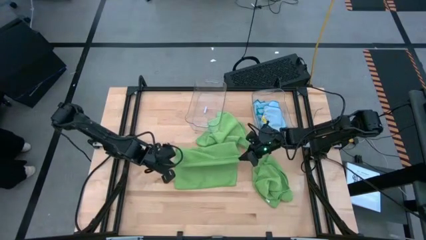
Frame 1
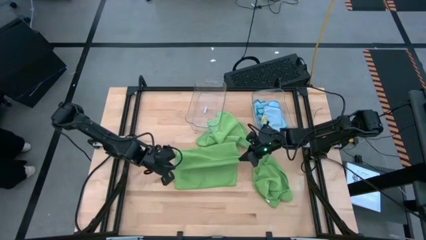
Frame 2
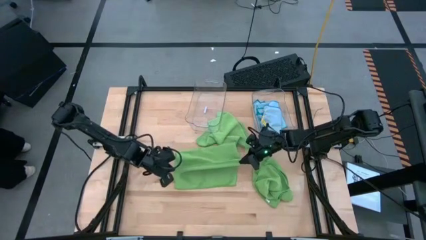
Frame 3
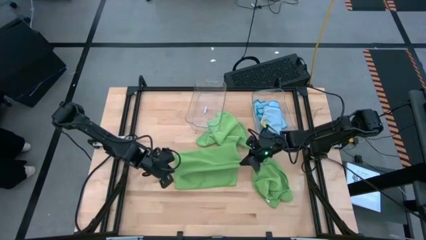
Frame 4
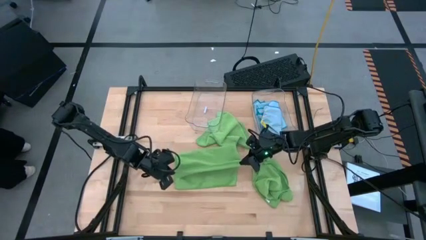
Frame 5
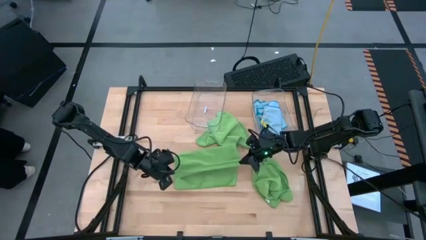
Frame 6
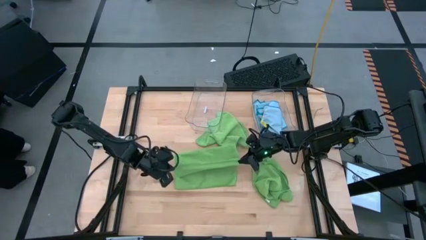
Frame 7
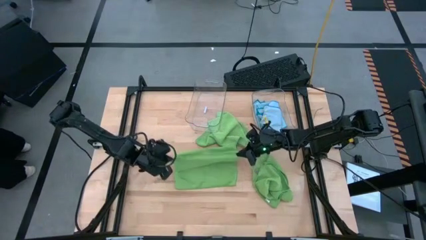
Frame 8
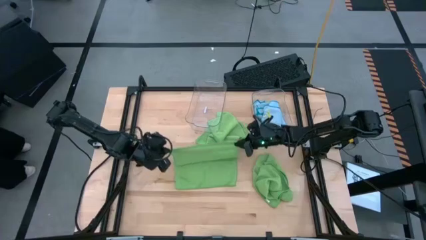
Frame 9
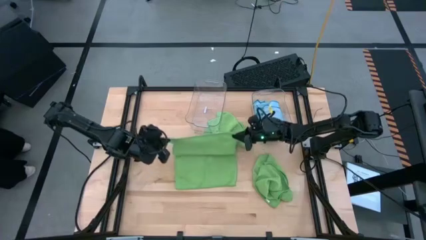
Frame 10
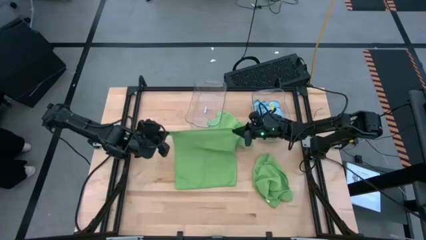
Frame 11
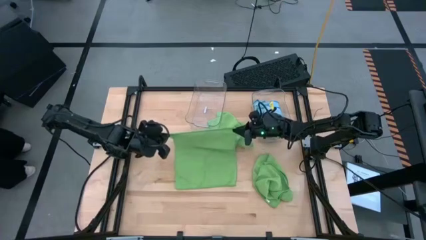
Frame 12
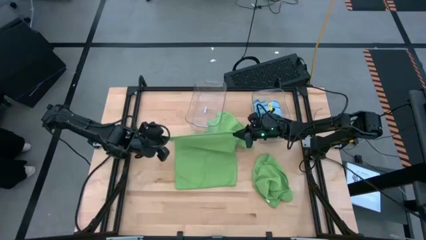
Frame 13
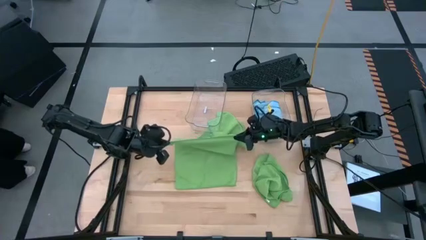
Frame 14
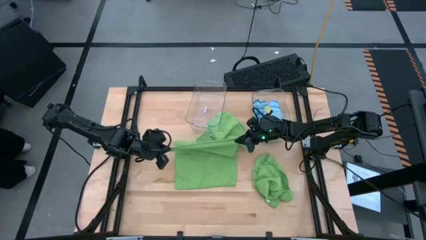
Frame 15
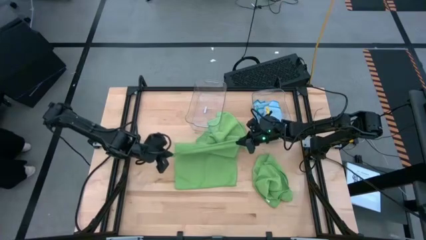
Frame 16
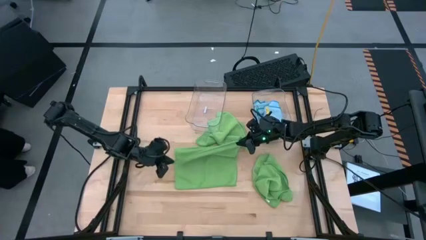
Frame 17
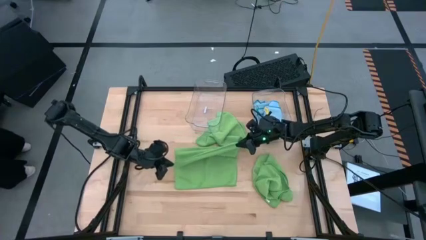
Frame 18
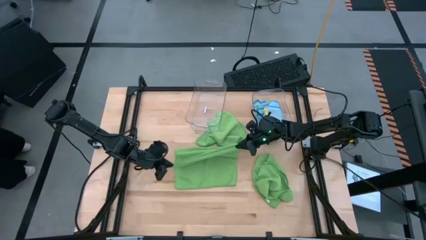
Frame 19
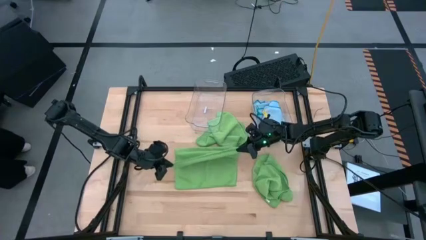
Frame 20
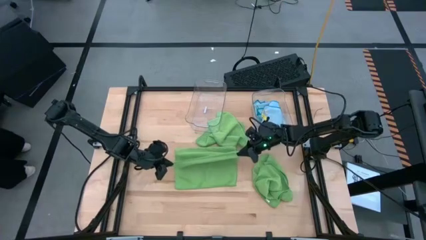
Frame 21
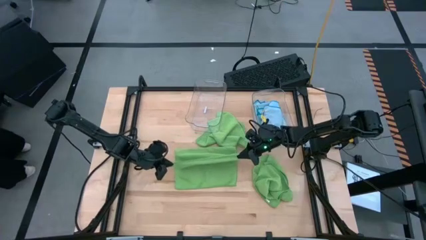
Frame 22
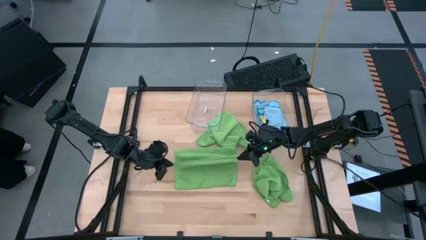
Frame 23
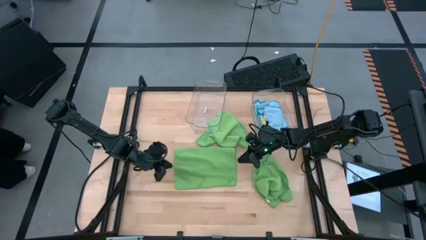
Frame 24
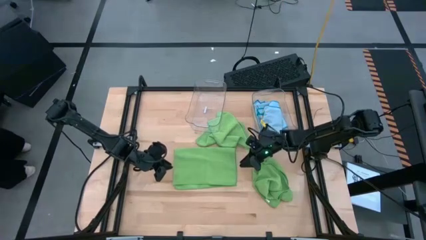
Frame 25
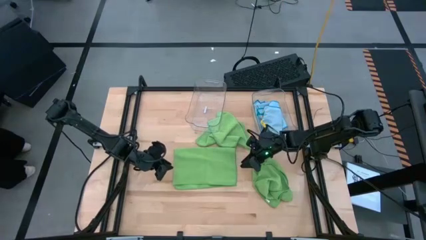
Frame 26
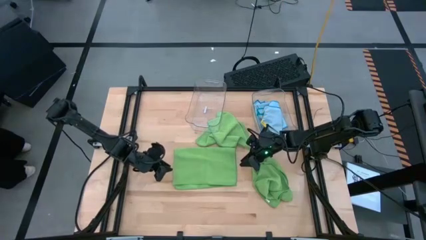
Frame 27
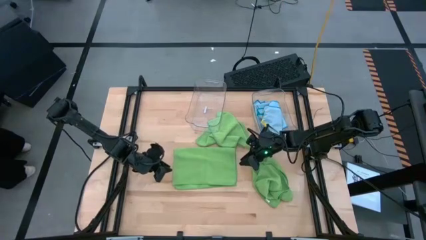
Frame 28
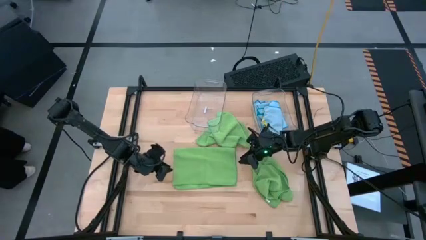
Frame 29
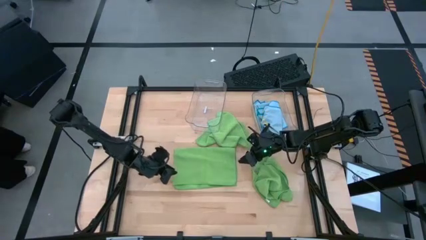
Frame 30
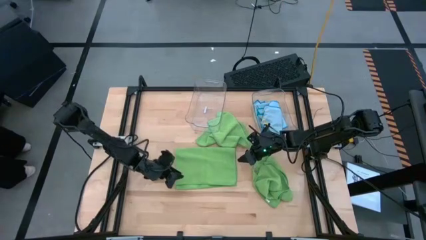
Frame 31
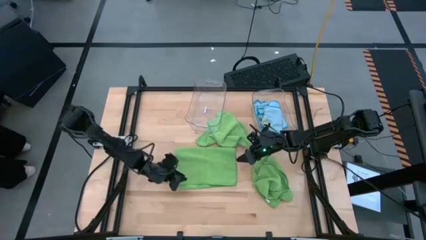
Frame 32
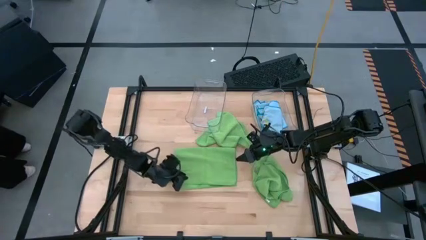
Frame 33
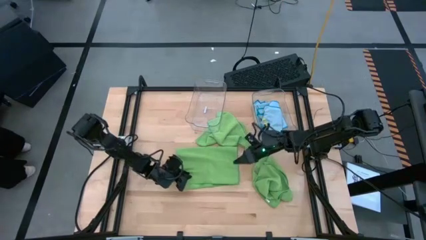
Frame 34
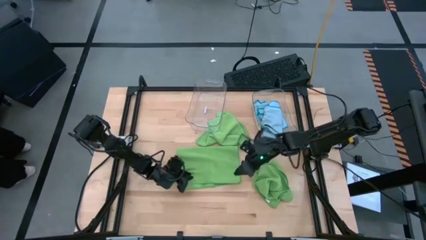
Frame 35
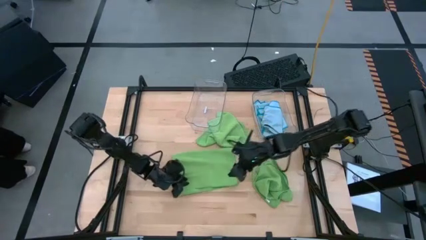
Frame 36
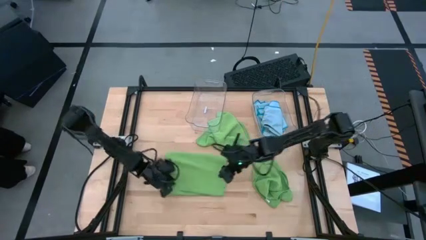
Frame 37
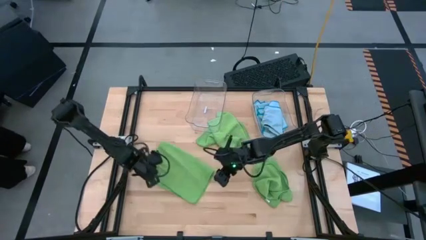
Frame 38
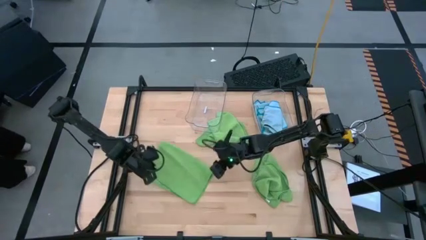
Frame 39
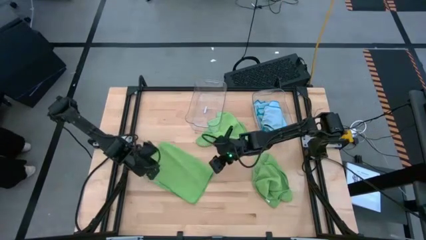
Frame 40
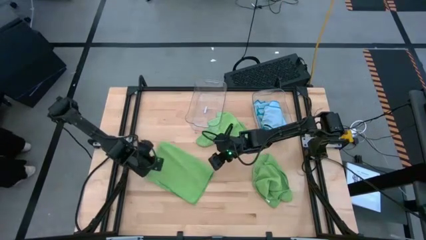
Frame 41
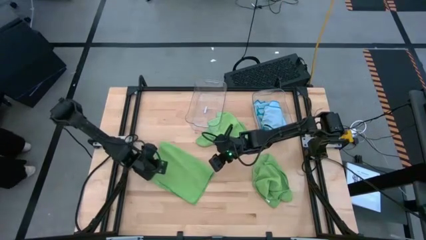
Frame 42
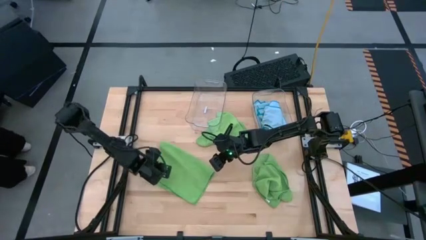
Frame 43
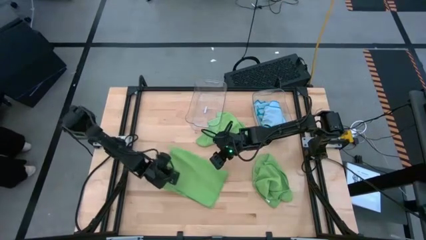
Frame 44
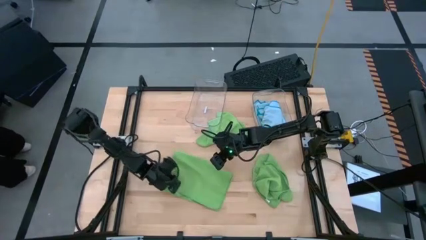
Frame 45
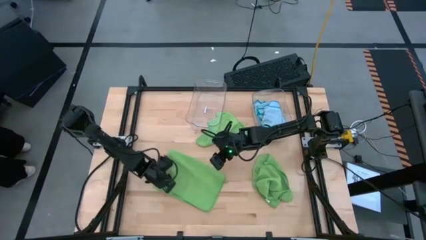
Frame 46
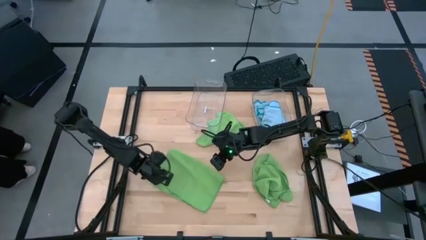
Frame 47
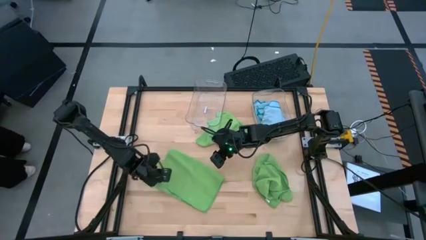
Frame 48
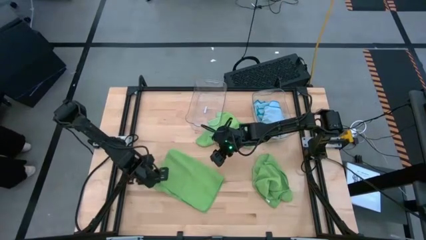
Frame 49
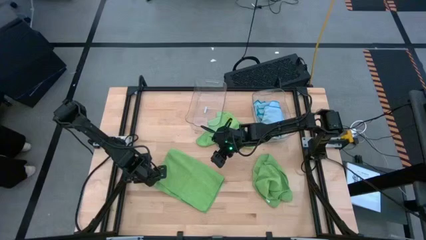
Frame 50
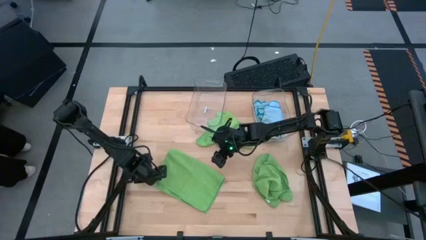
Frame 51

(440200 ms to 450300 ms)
Task: Fold microfiber towels
Fold the bottom left green microfiber towel

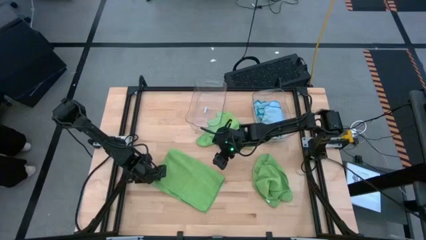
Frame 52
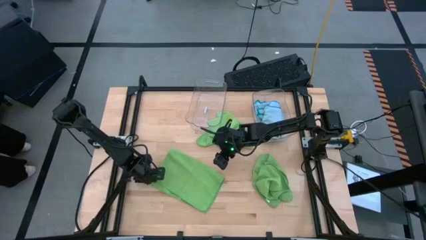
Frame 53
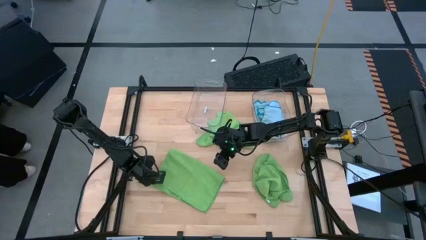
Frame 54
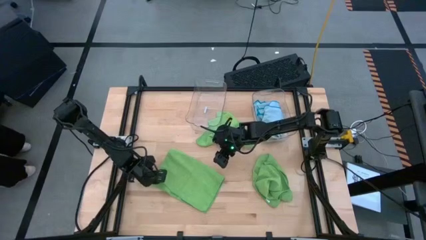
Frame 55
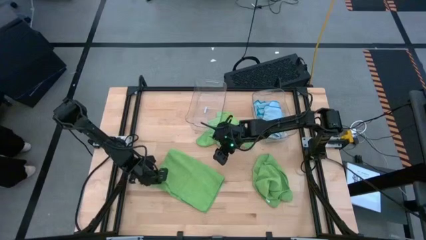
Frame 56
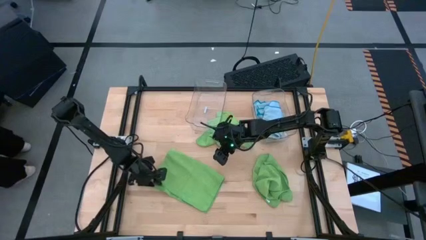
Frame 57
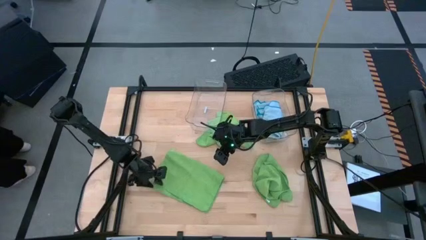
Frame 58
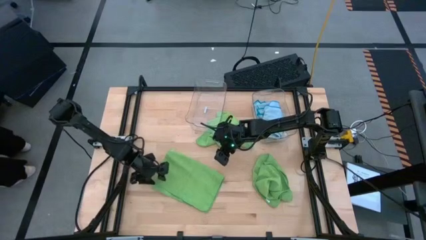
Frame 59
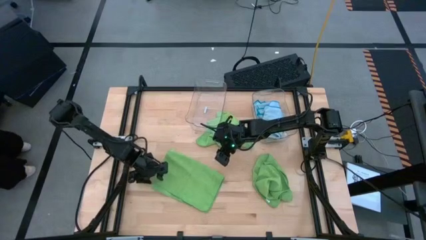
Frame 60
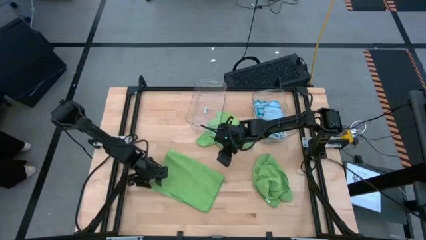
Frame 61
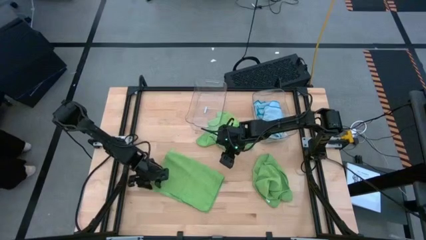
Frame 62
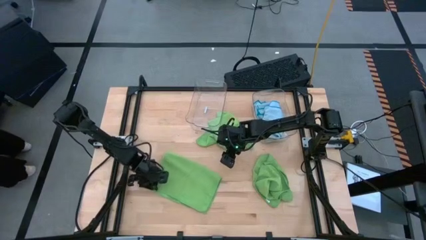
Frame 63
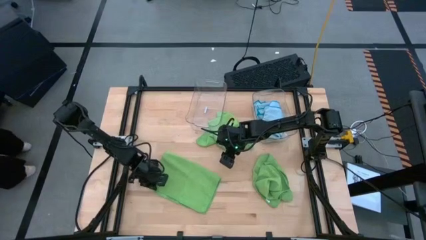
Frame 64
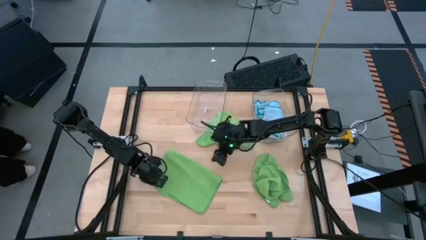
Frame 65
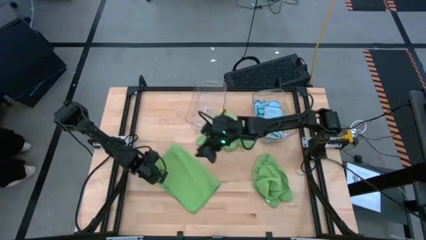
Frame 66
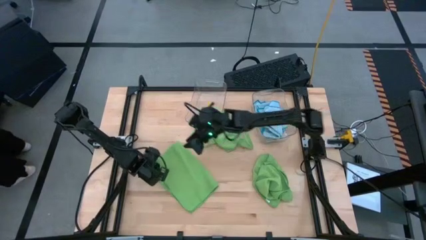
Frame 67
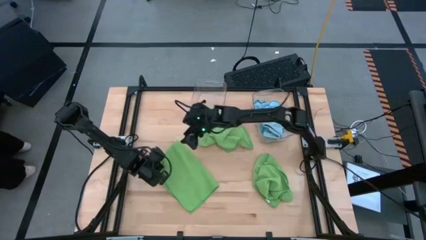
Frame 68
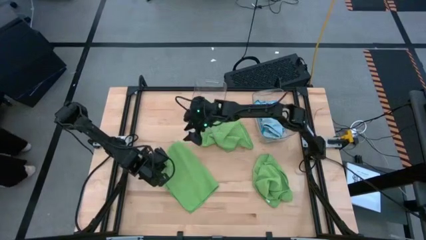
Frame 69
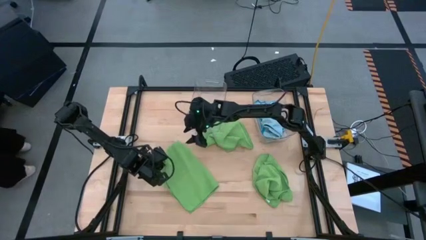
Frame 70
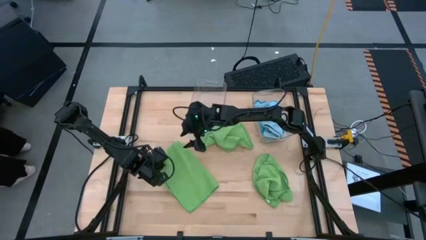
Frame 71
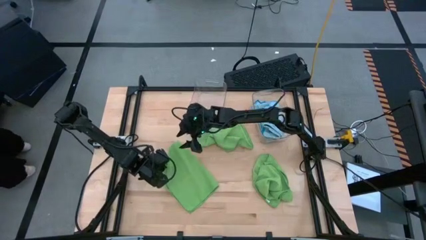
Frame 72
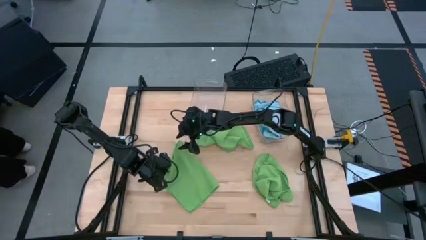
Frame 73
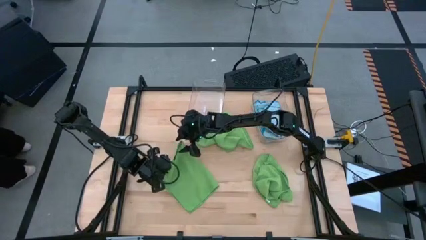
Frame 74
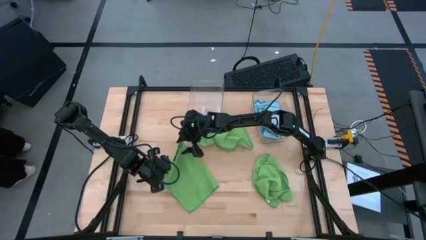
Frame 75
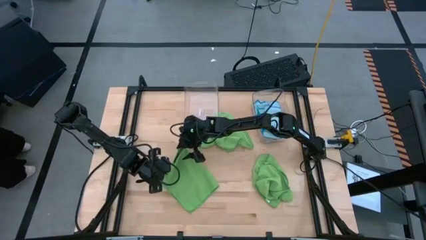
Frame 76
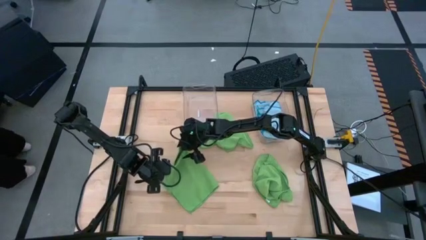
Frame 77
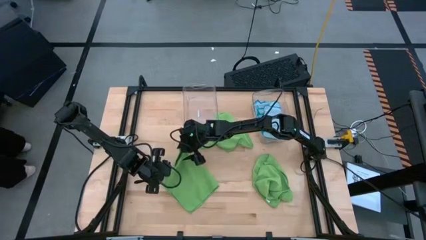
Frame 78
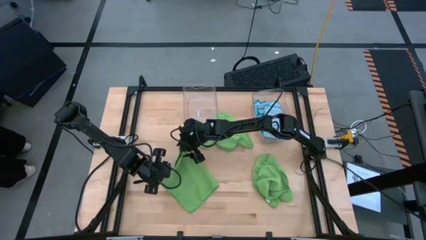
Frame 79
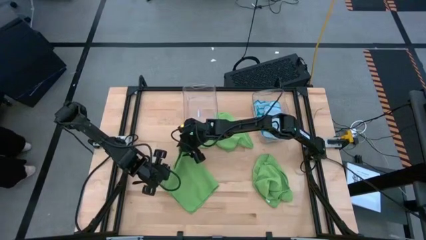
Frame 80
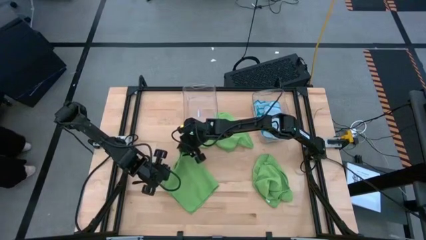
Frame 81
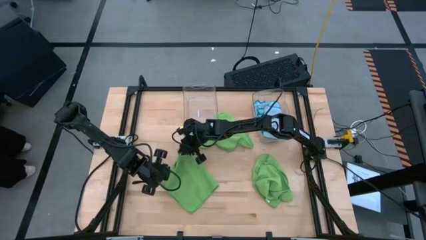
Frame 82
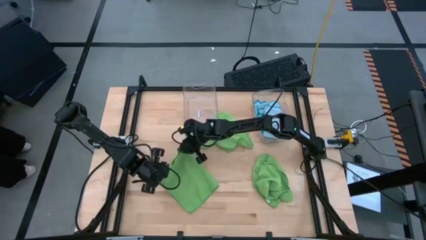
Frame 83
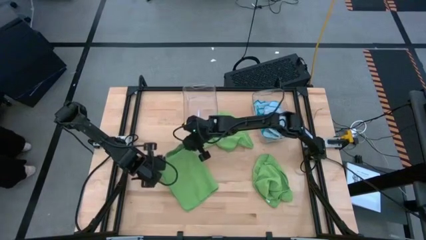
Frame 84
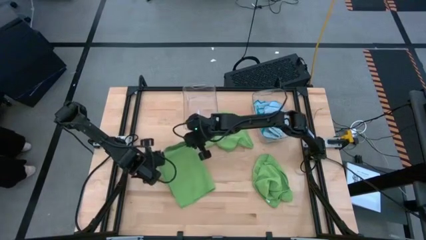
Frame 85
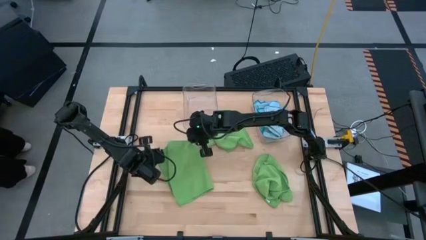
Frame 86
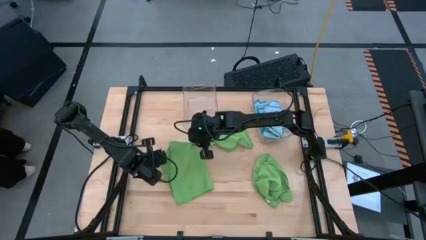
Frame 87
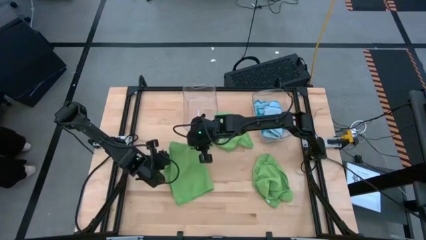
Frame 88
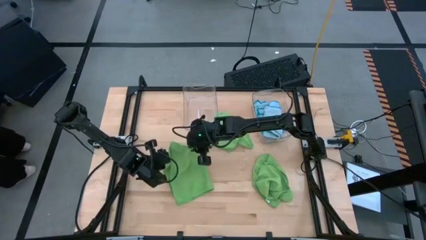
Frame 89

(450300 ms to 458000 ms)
Fold the bottom left green microfiber towel
